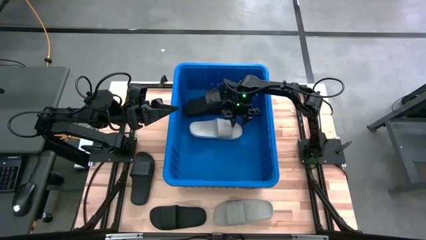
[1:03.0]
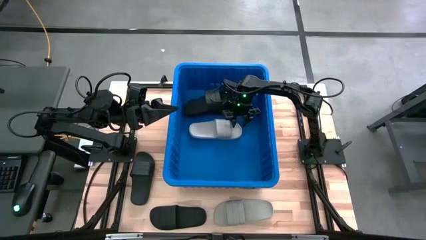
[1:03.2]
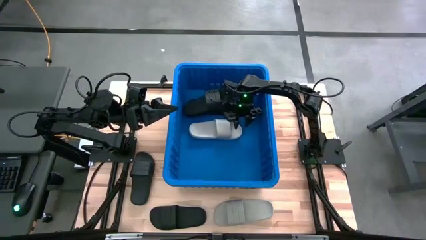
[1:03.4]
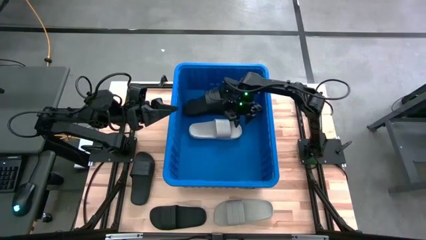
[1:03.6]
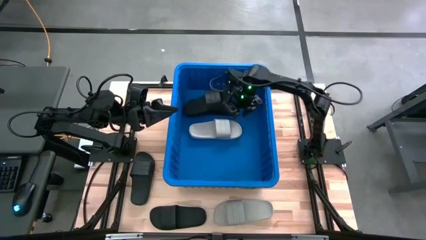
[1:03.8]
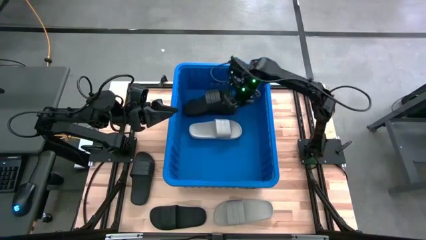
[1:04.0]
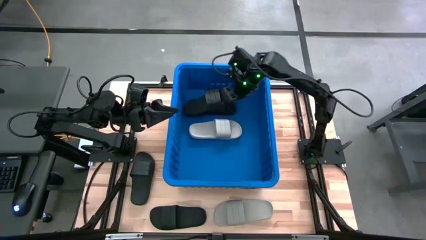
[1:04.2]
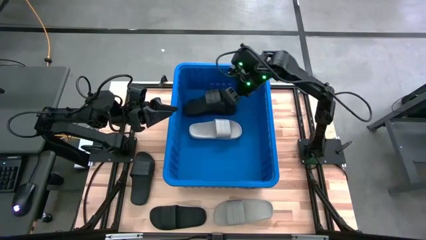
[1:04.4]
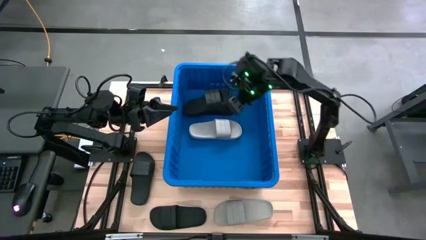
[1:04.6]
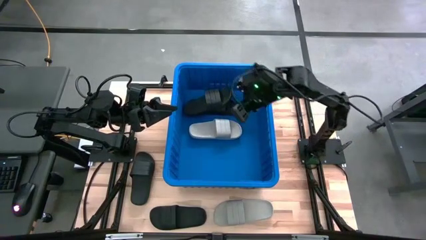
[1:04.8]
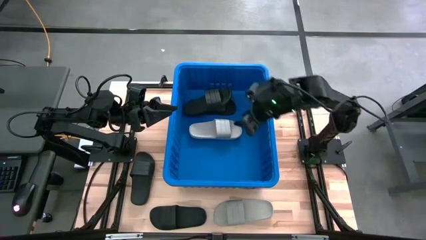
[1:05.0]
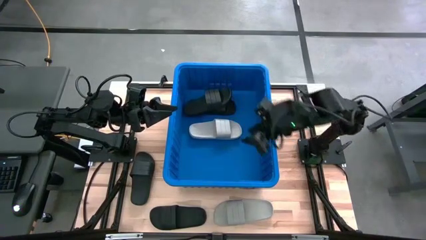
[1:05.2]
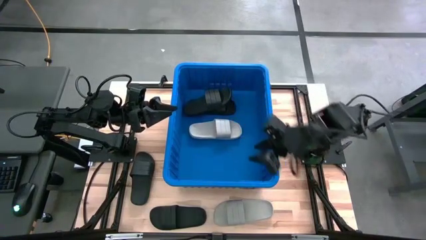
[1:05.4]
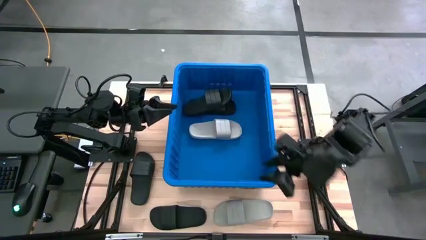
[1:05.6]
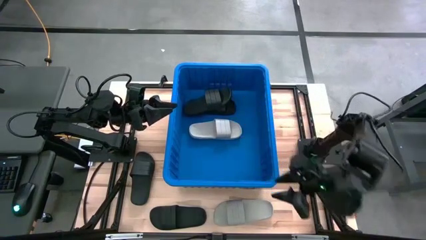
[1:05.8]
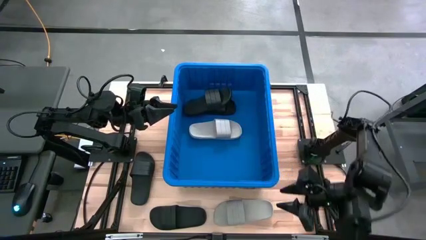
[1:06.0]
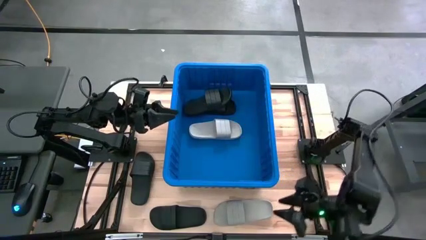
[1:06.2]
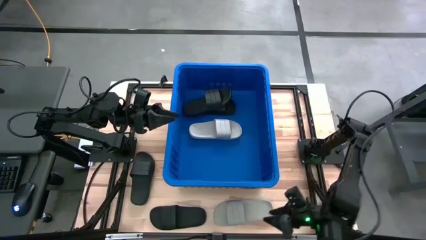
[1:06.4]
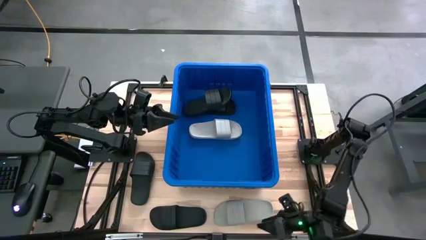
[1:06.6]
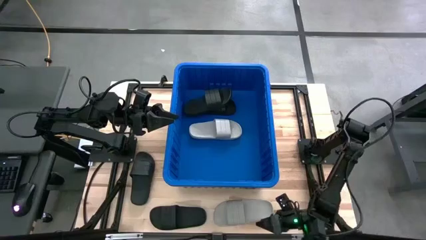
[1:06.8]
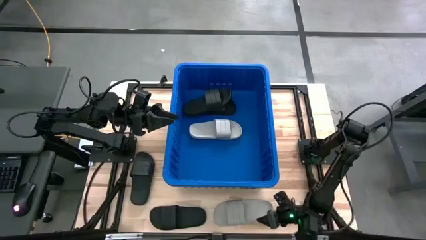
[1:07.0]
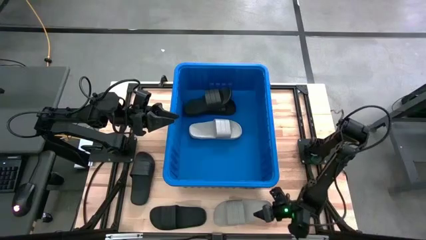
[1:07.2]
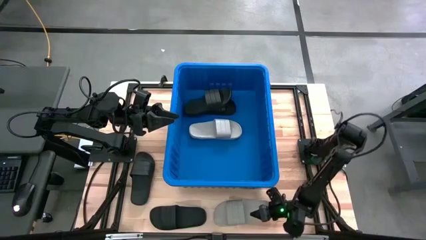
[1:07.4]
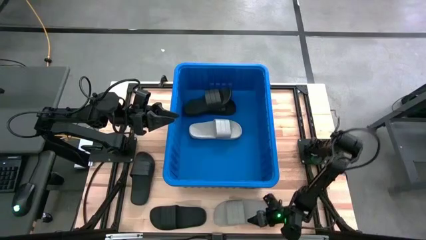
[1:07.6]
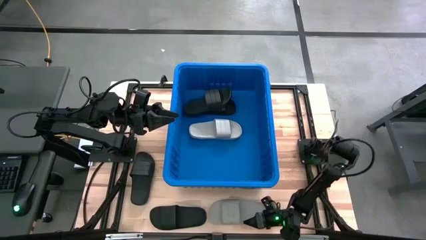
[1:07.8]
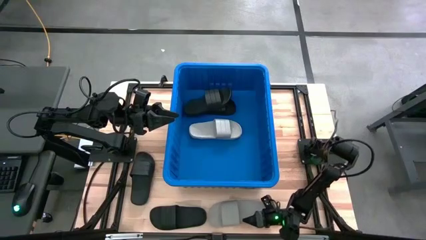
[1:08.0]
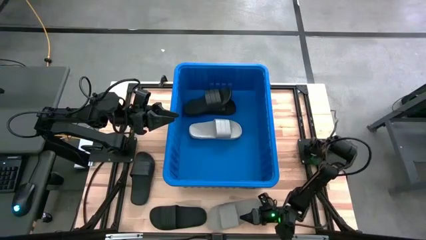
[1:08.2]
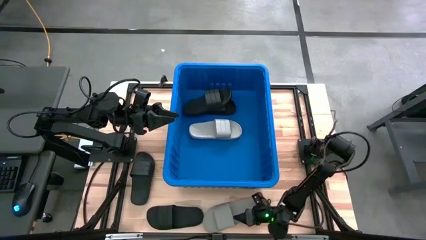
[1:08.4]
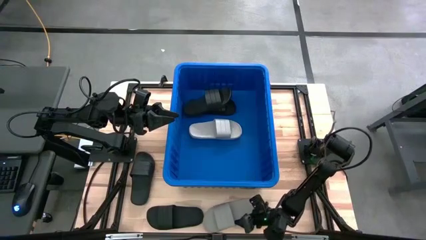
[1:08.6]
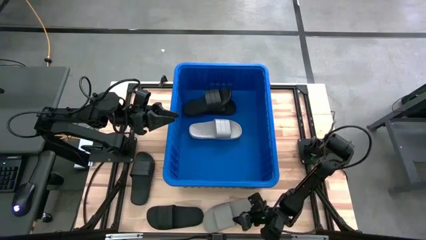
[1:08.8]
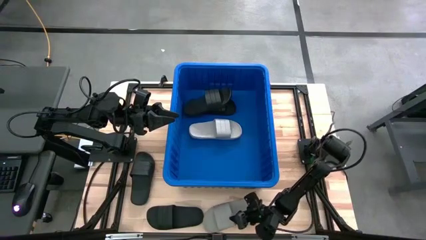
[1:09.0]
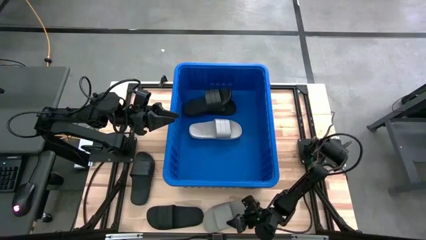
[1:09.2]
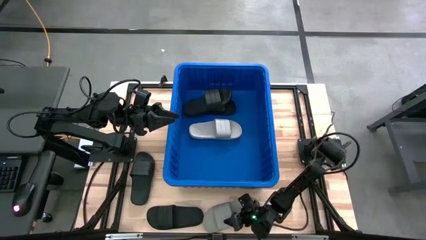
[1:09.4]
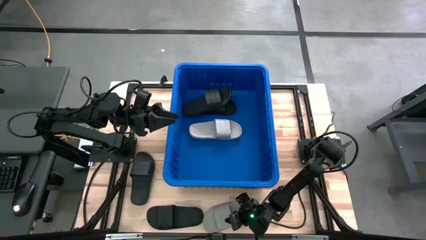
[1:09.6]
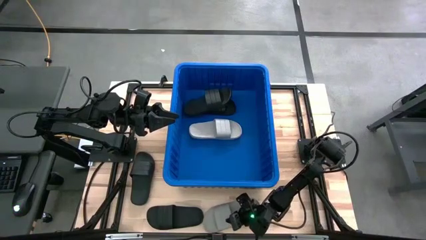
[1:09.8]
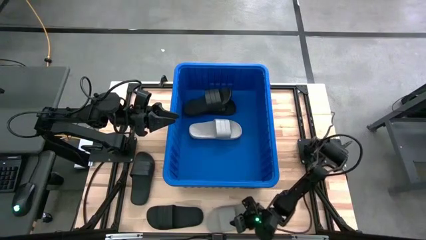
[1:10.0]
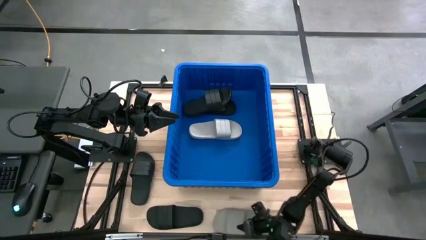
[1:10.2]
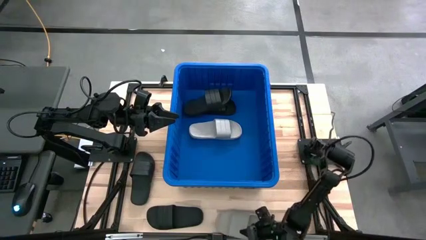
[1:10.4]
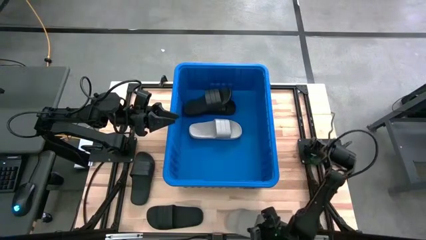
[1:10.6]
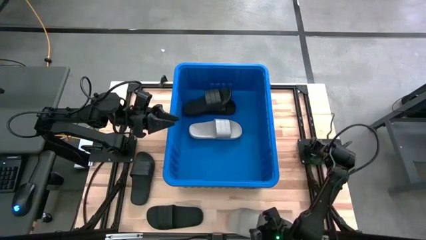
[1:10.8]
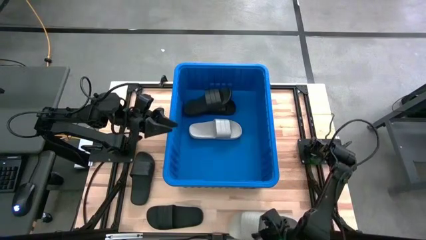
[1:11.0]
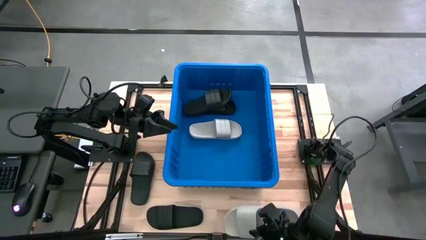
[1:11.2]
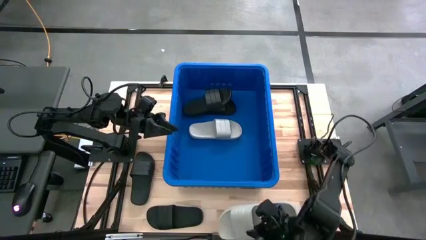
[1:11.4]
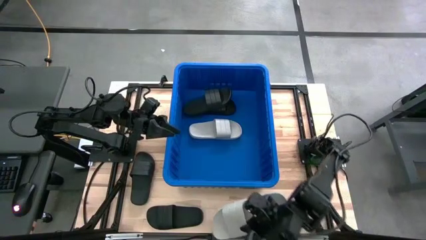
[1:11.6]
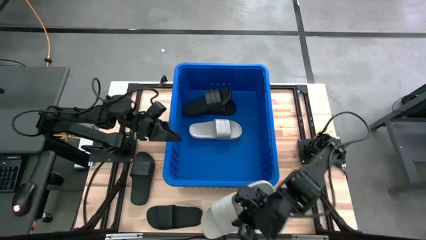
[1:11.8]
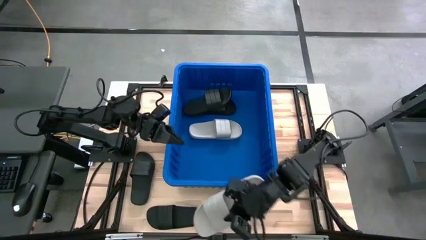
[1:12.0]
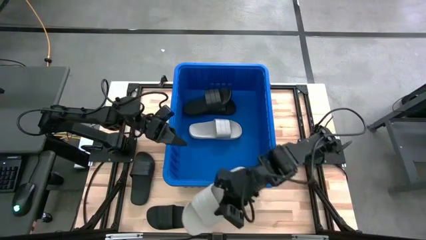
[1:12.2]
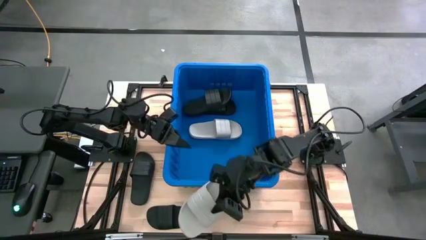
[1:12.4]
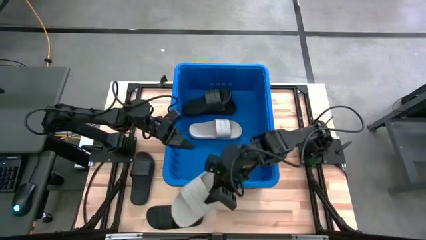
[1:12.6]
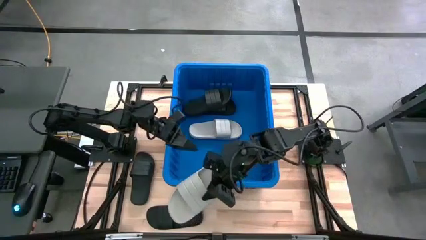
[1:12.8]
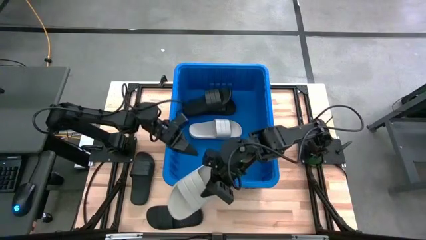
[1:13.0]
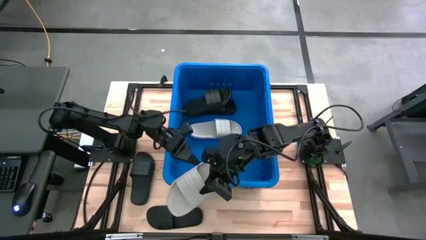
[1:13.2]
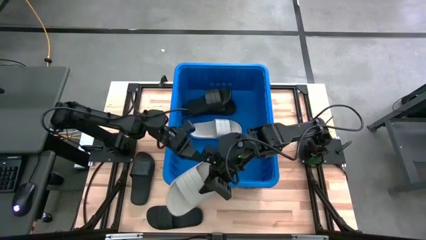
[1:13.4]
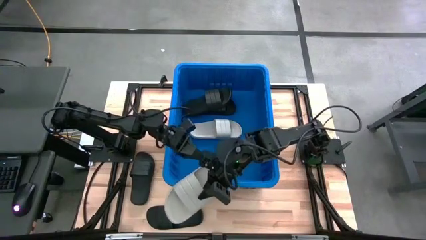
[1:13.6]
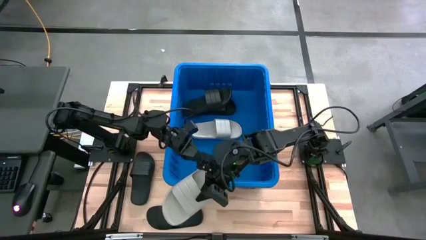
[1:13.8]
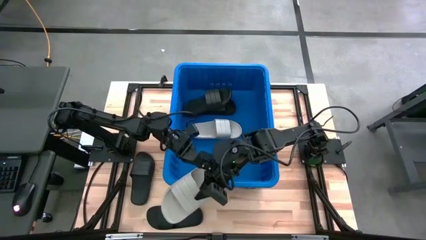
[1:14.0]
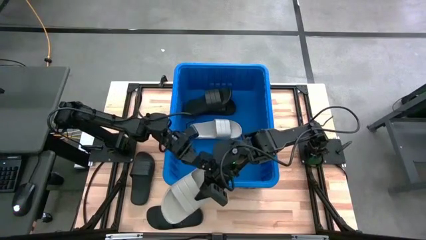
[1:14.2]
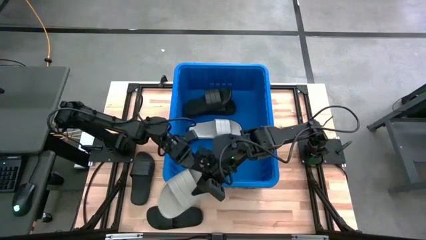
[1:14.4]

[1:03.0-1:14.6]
Task: Pick and place slides into bin
Put the white slipper into the bin
